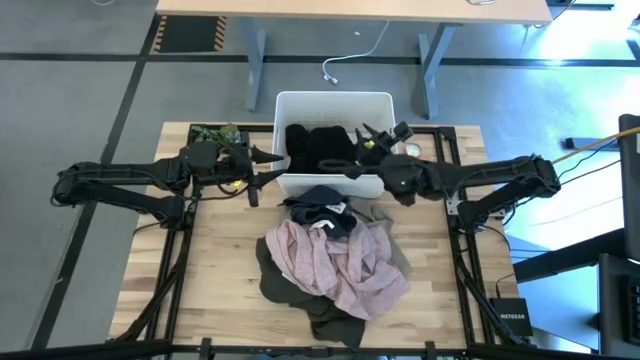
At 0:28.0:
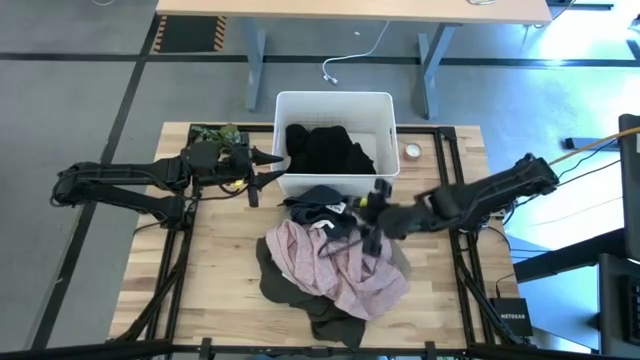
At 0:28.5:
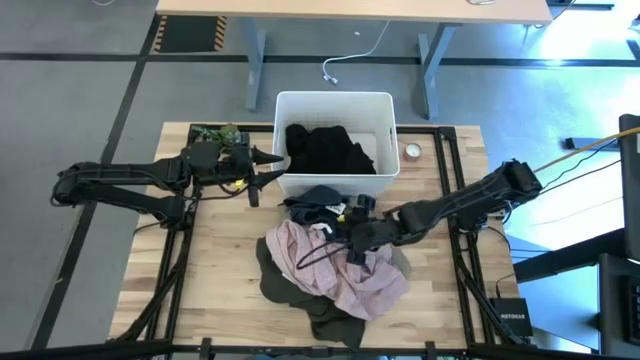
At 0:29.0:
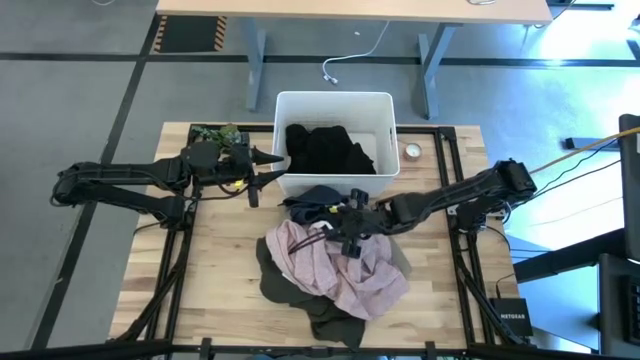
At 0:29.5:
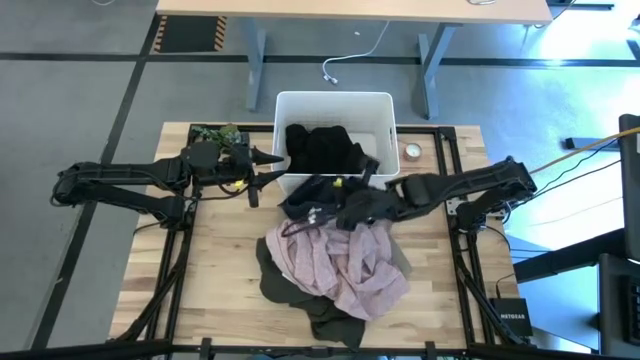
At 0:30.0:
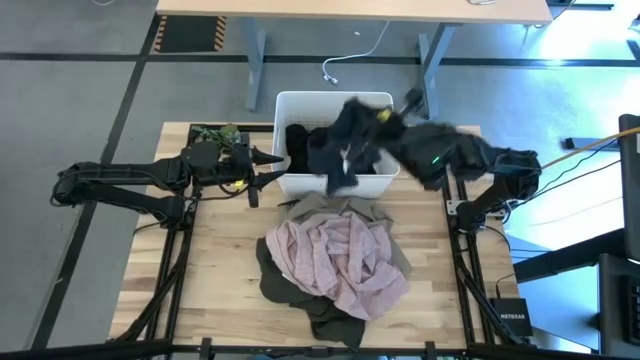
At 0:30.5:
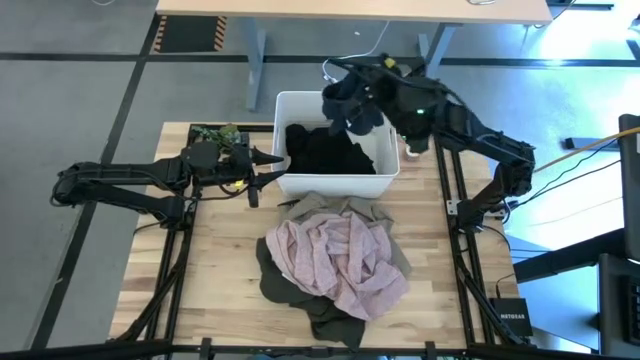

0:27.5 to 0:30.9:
Task: Sort clothes
Put the blue shorts into the white laundry bin

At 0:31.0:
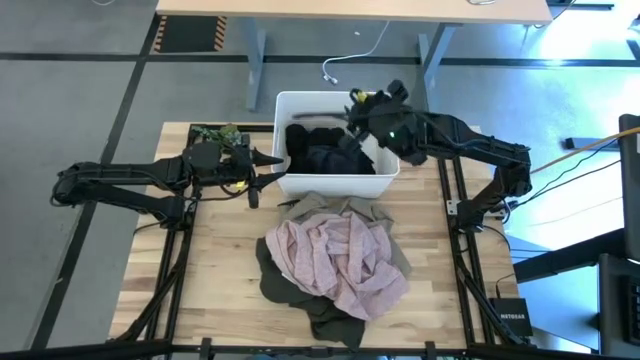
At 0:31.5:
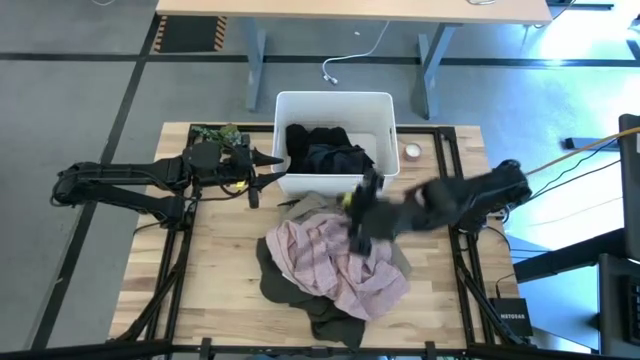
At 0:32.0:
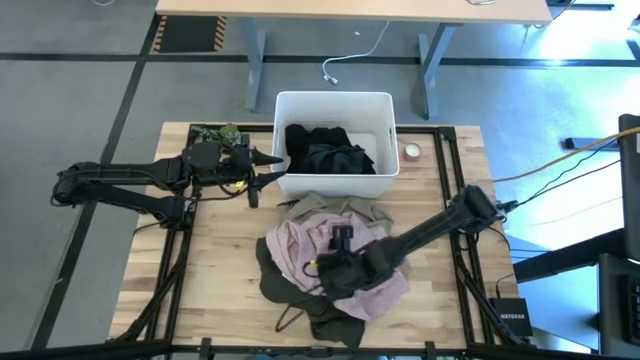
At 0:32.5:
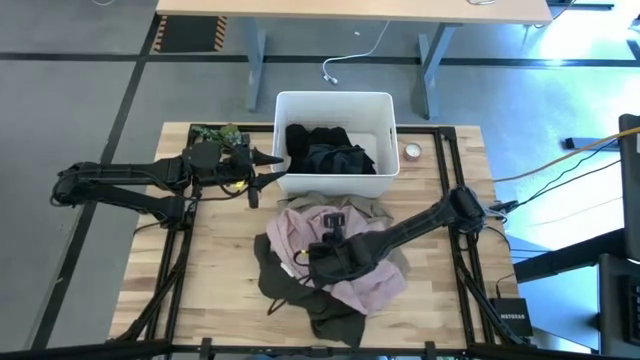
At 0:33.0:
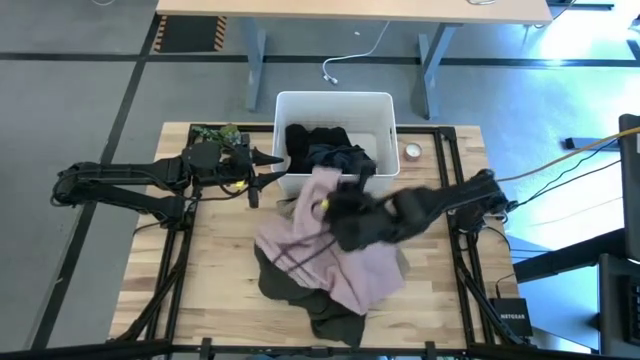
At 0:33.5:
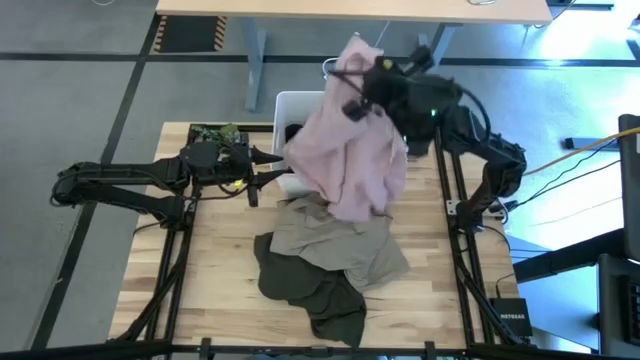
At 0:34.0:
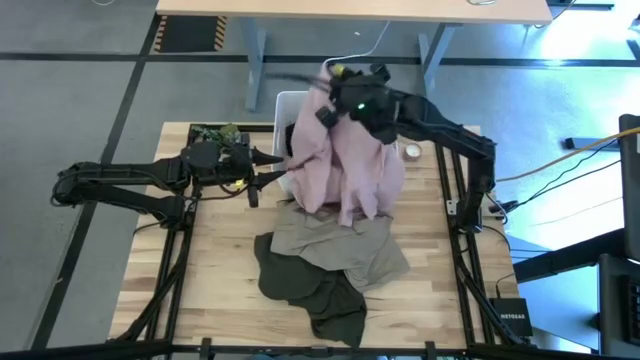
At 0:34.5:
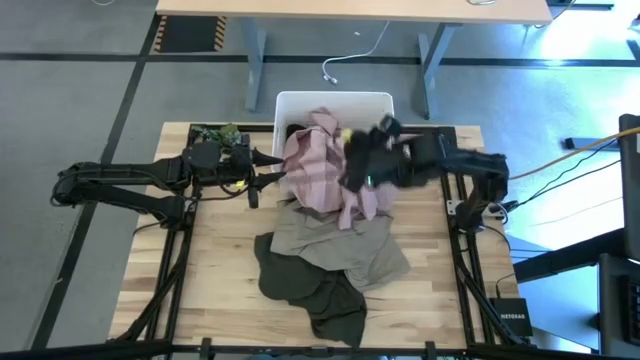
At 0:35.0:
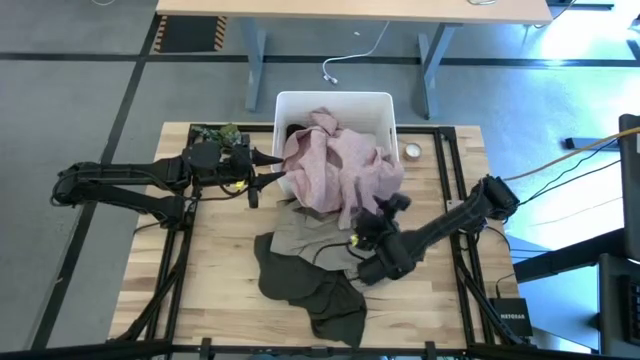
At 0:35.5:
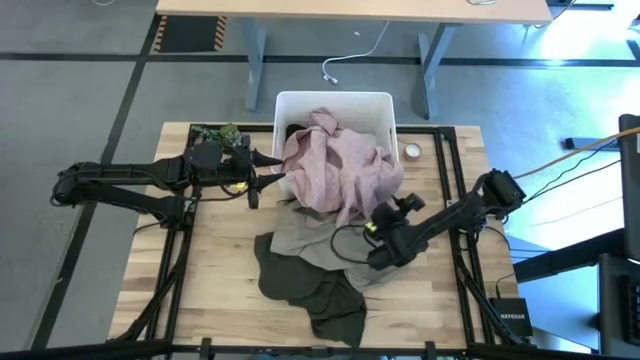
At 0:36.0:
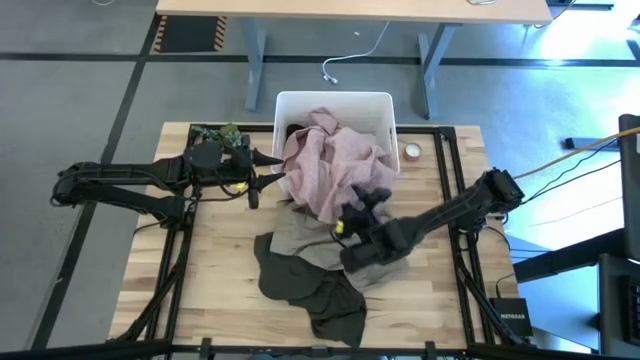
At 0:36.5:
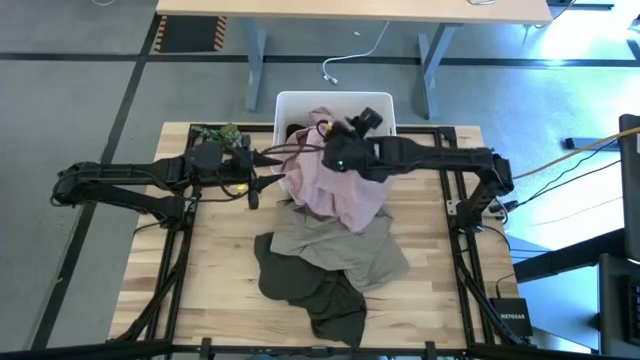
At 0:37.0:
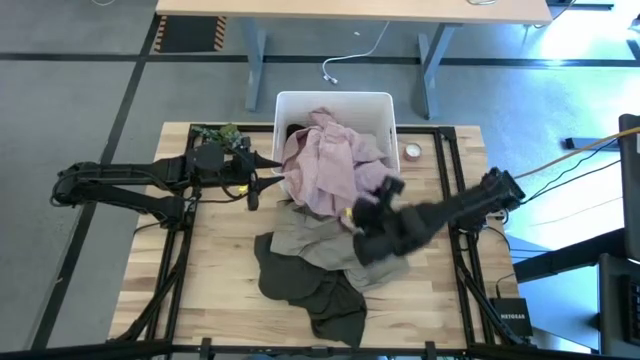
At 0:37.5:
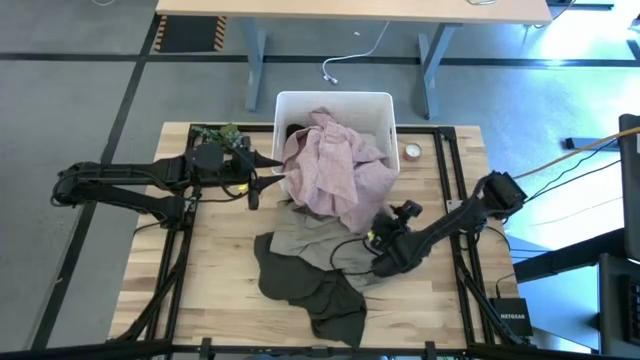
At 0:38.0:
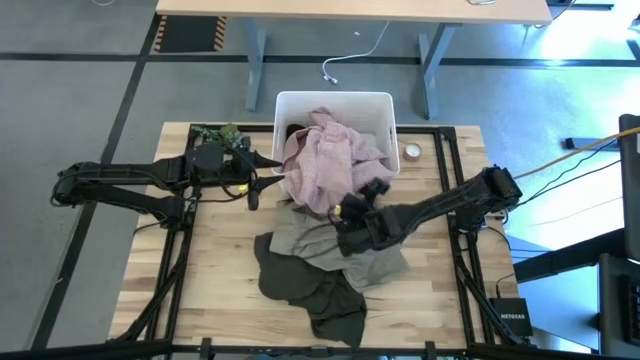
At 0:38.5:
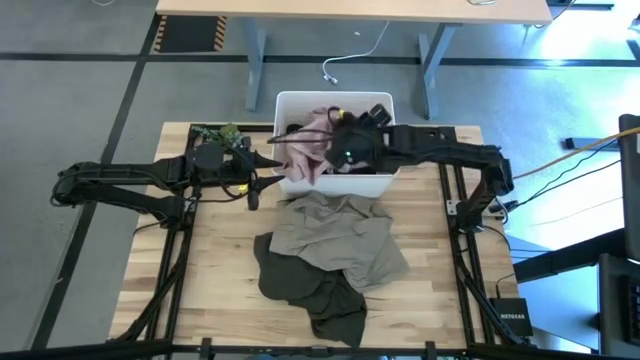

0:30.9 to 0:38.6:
Put the pink polo shirt into the white laundry bin

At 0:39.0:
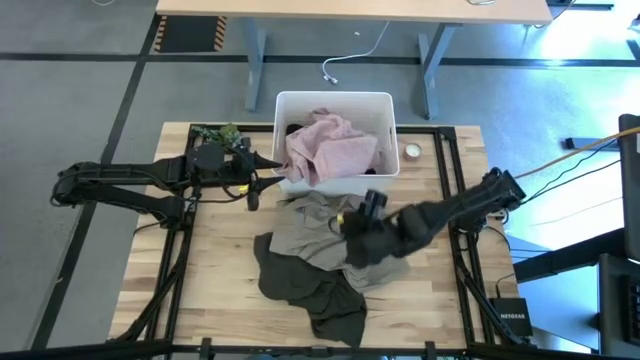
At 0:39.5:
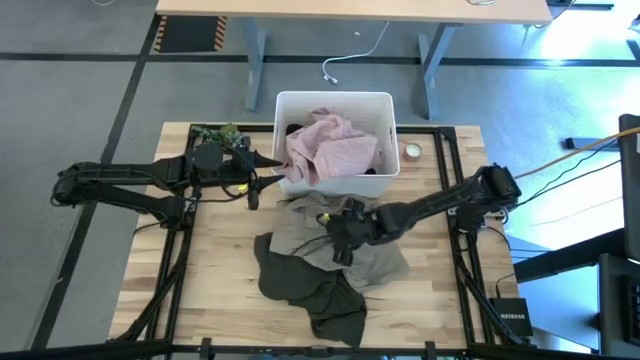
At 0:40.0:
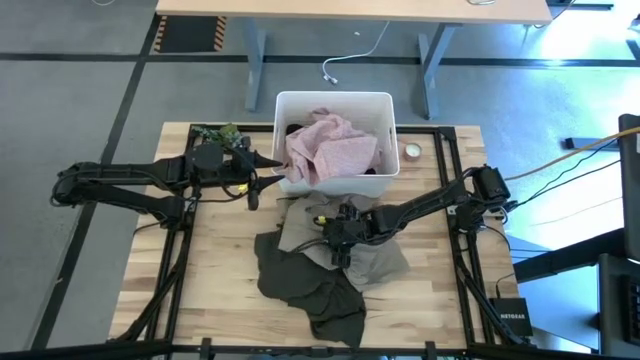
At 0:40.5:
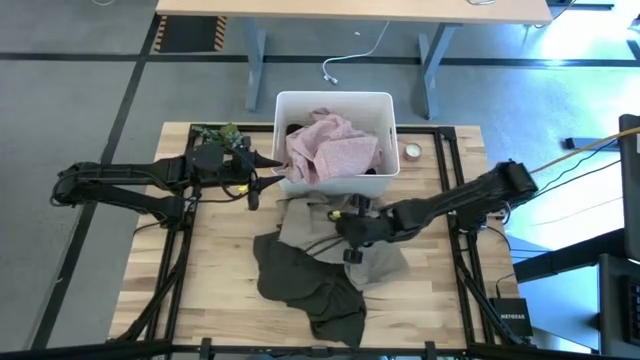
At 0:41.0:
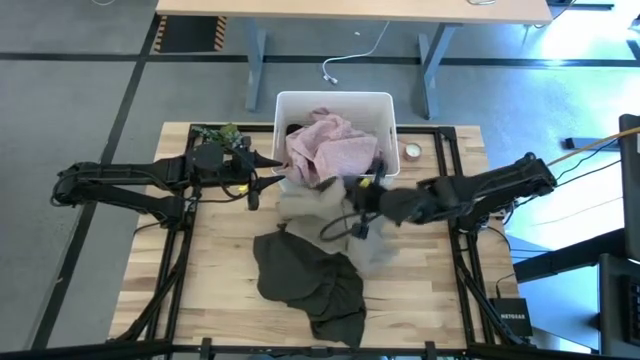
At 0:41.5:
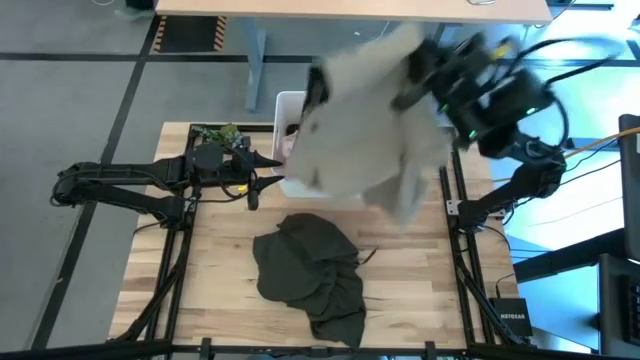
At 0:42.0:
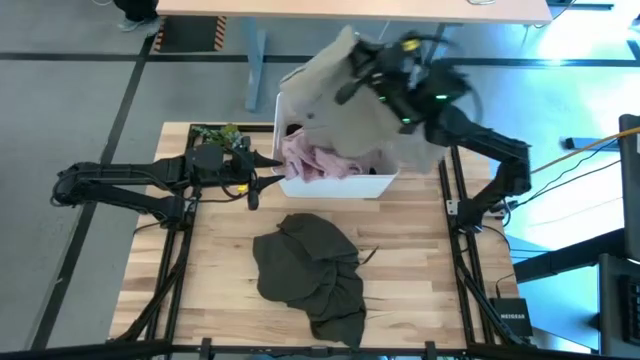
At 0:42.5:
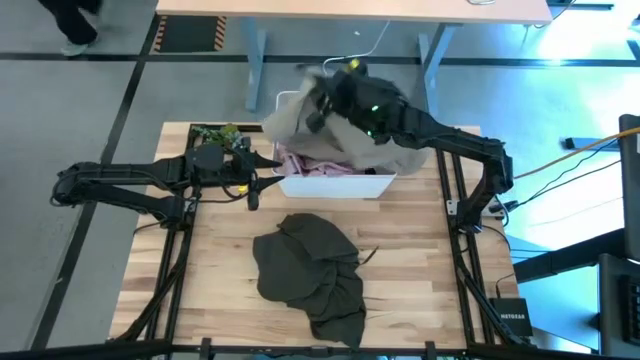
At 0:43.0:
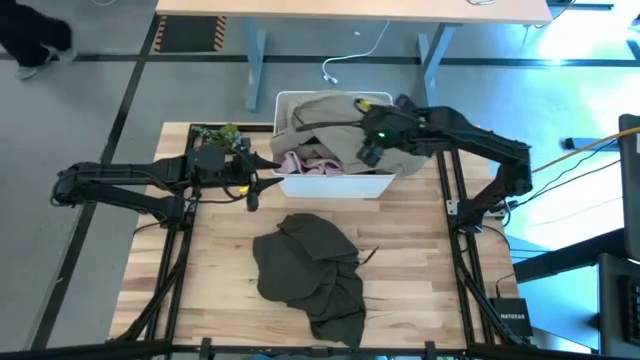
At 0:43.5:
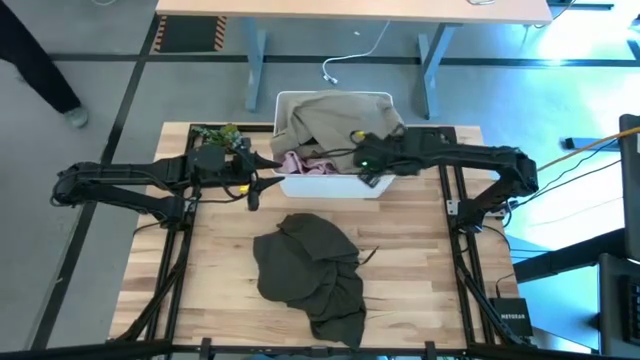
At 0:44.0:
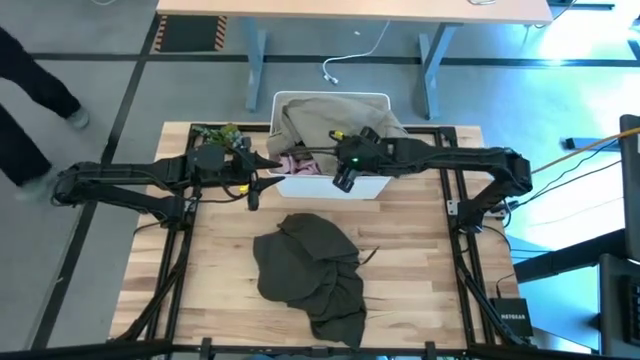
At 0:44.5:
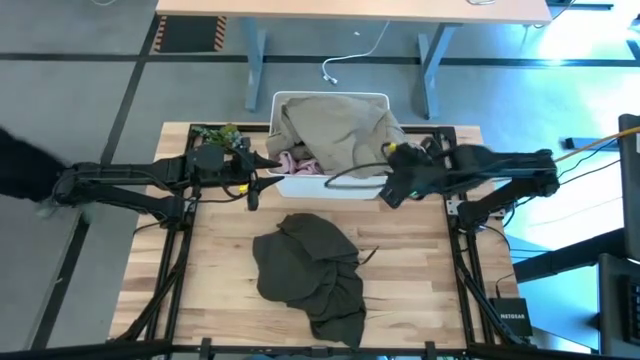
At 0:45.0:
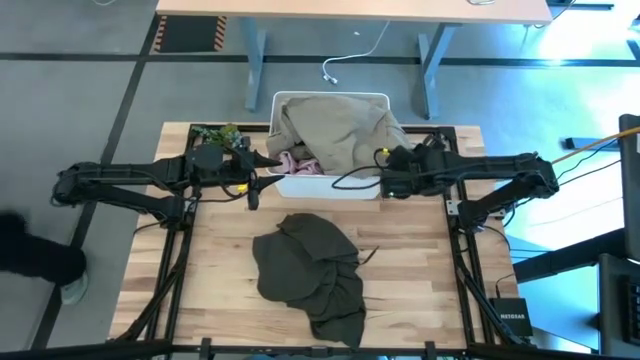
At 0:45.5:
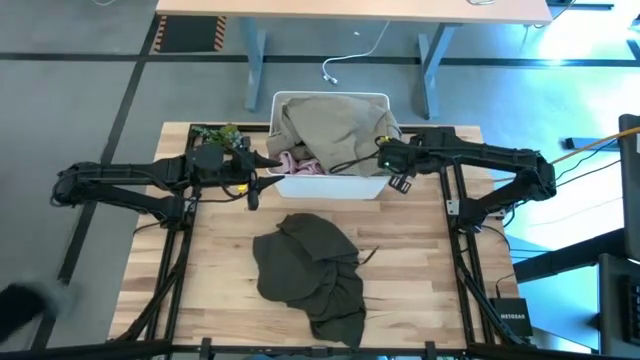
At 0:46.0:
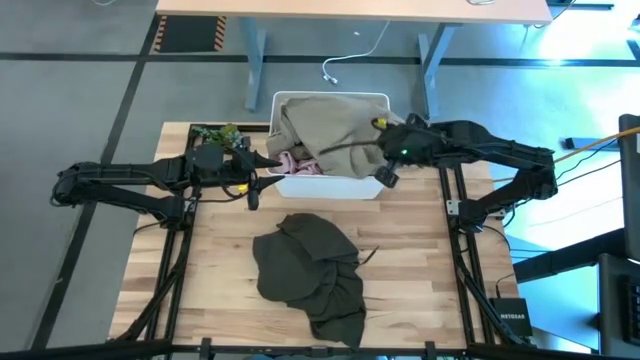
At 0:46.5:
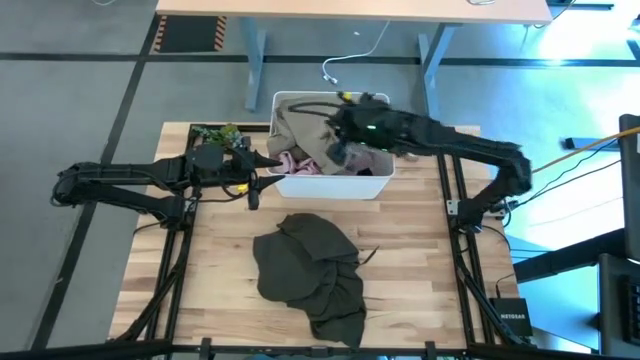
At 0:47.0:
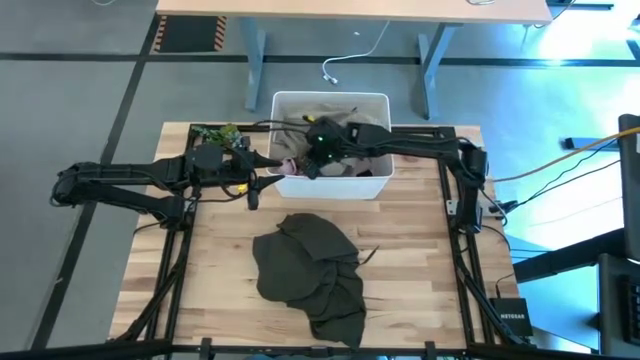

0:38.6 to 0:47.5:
Put the brown shorts into the white laundry bin
